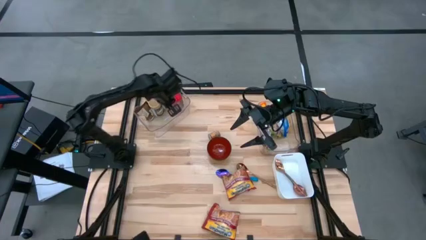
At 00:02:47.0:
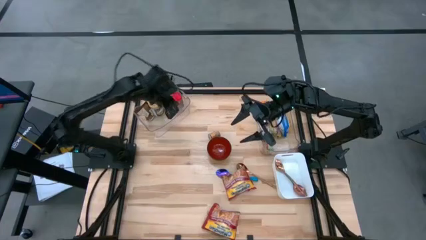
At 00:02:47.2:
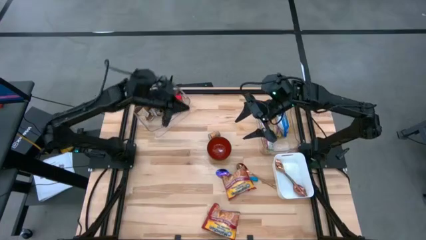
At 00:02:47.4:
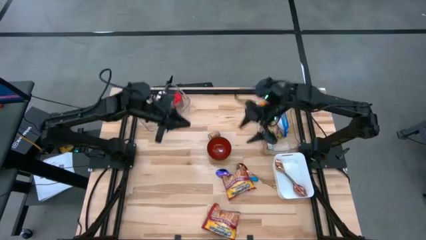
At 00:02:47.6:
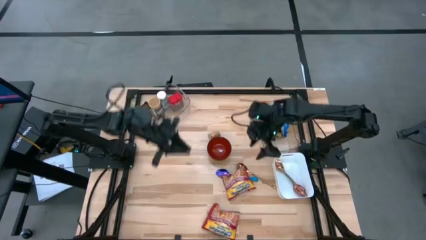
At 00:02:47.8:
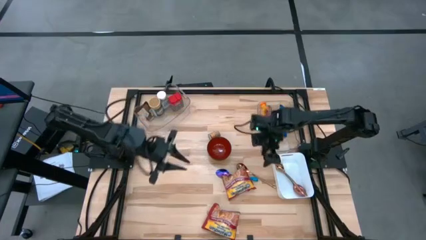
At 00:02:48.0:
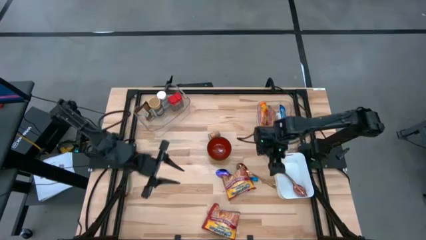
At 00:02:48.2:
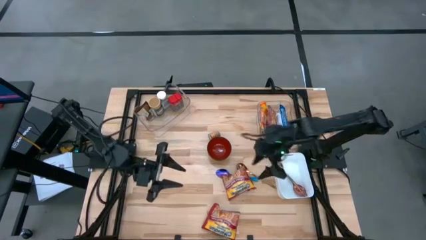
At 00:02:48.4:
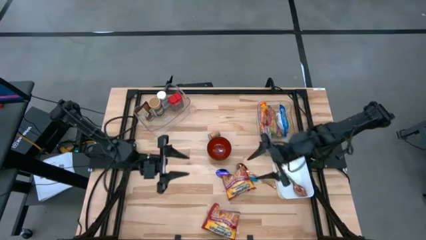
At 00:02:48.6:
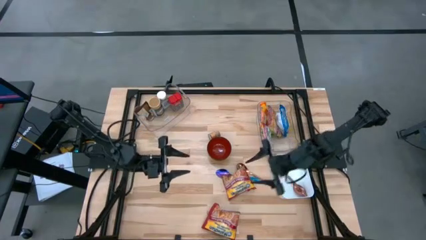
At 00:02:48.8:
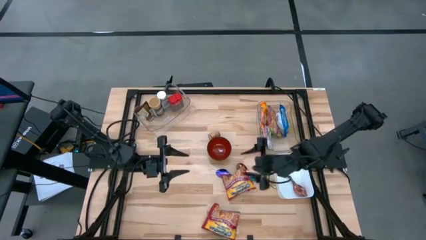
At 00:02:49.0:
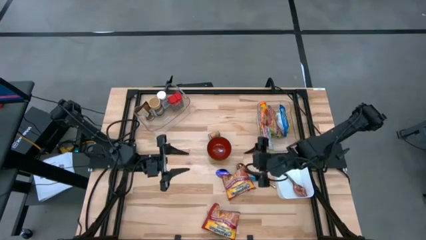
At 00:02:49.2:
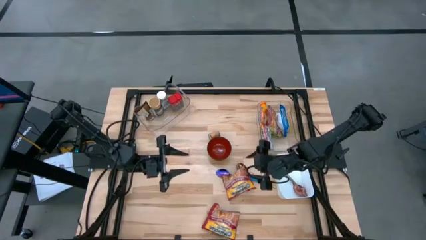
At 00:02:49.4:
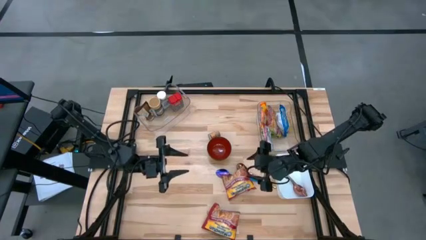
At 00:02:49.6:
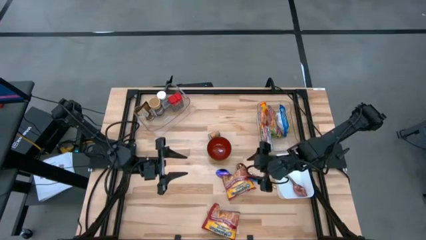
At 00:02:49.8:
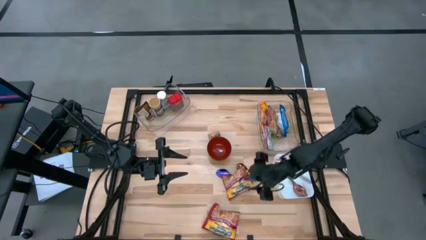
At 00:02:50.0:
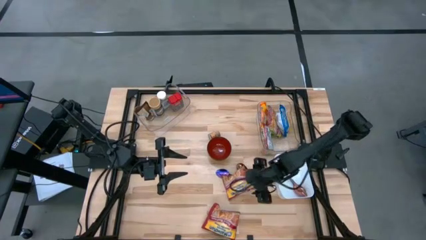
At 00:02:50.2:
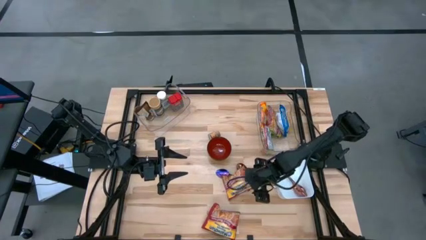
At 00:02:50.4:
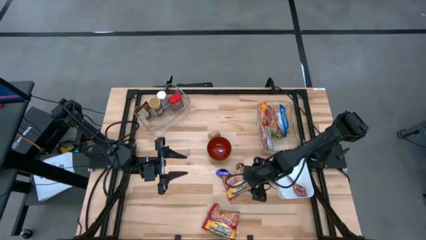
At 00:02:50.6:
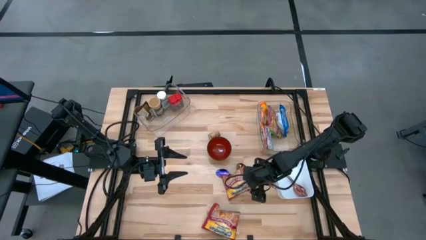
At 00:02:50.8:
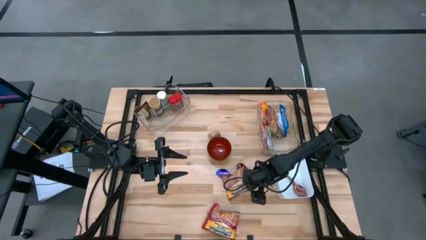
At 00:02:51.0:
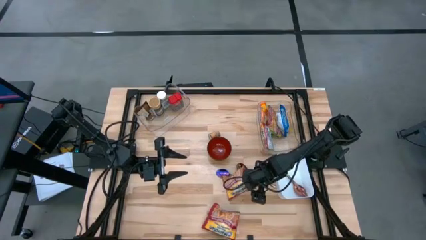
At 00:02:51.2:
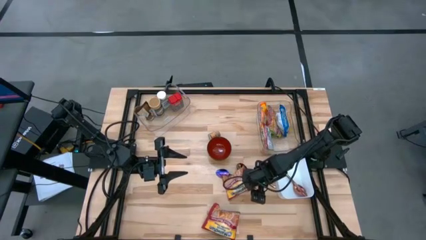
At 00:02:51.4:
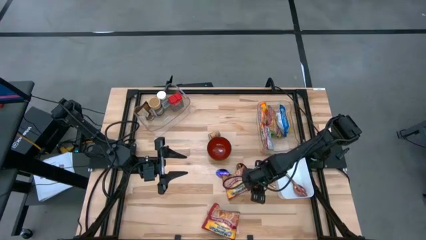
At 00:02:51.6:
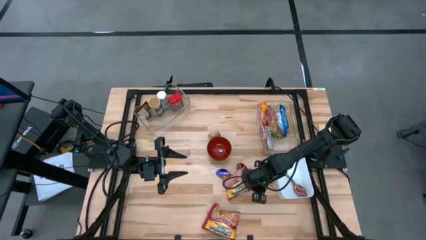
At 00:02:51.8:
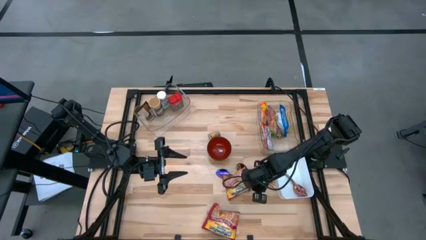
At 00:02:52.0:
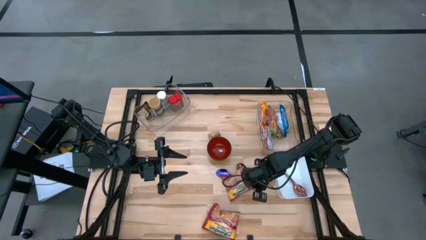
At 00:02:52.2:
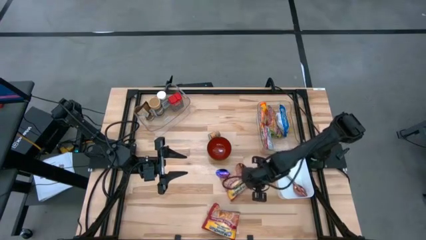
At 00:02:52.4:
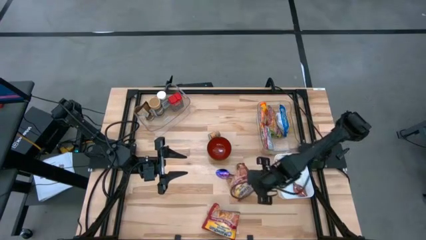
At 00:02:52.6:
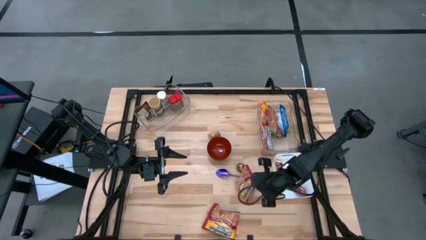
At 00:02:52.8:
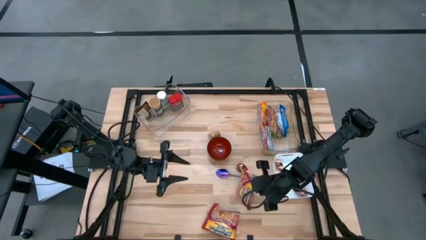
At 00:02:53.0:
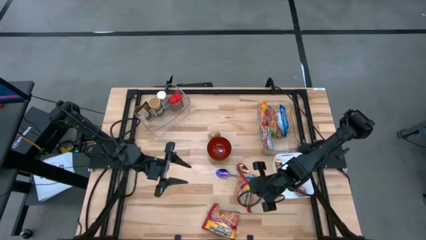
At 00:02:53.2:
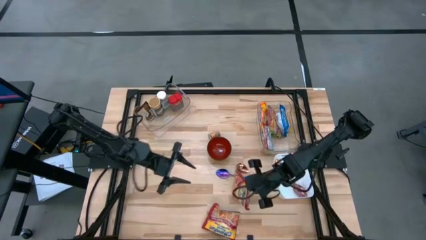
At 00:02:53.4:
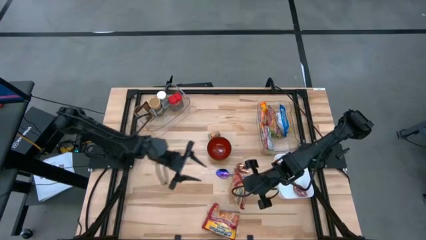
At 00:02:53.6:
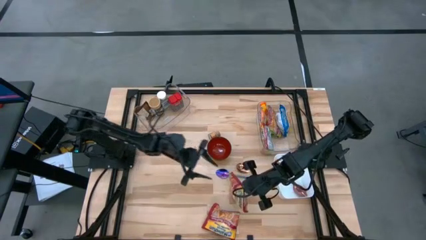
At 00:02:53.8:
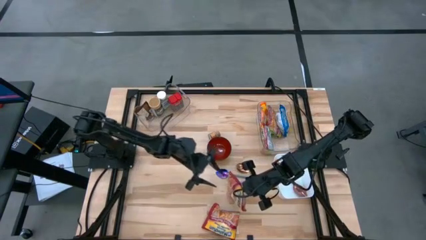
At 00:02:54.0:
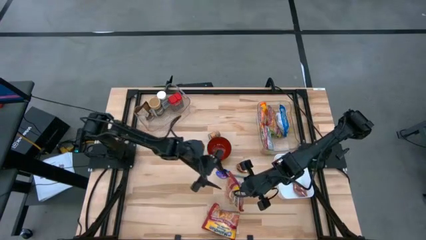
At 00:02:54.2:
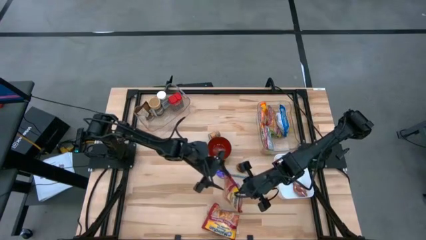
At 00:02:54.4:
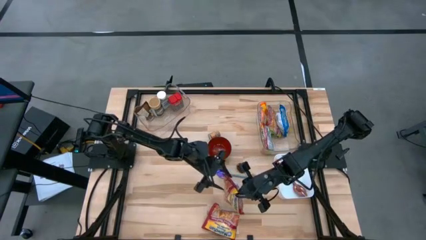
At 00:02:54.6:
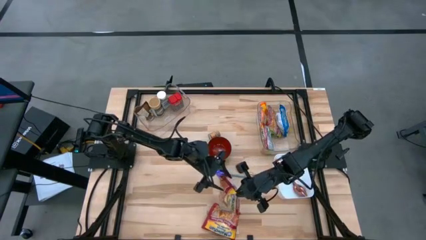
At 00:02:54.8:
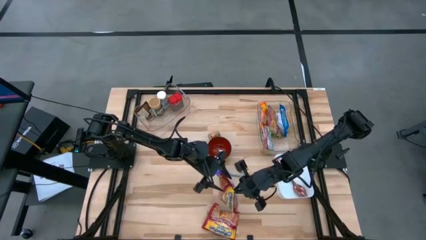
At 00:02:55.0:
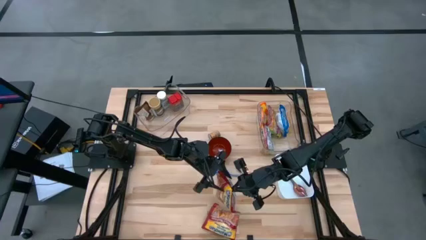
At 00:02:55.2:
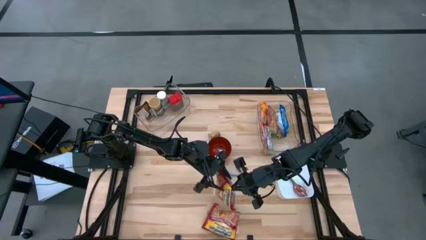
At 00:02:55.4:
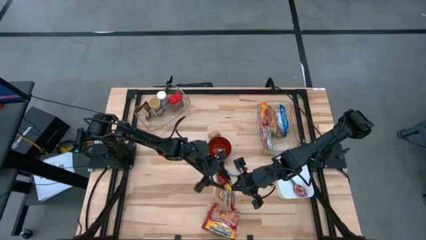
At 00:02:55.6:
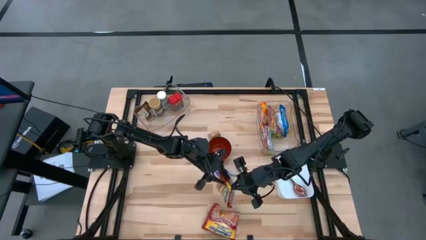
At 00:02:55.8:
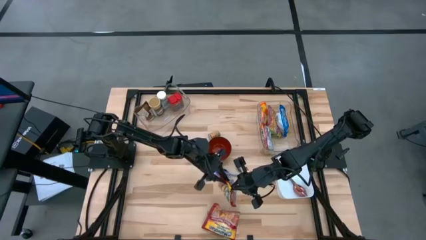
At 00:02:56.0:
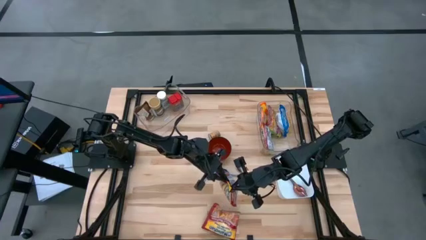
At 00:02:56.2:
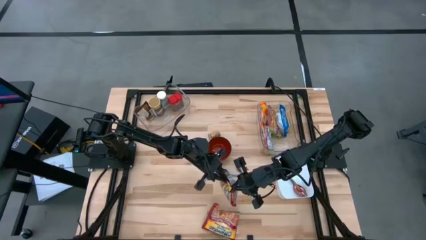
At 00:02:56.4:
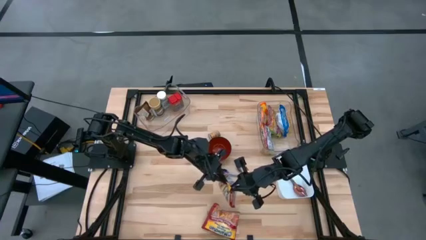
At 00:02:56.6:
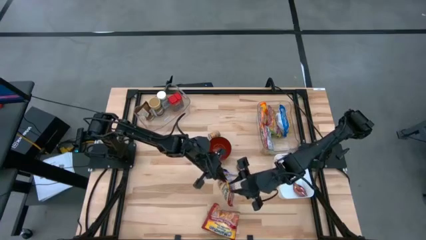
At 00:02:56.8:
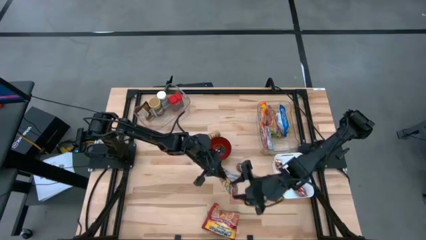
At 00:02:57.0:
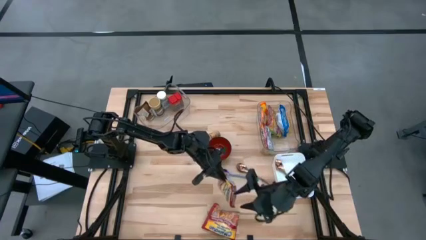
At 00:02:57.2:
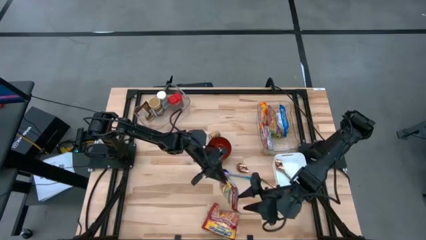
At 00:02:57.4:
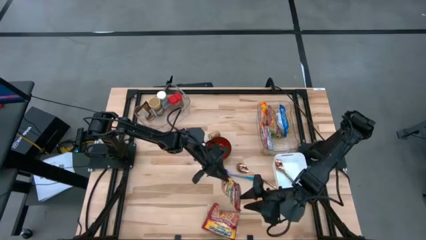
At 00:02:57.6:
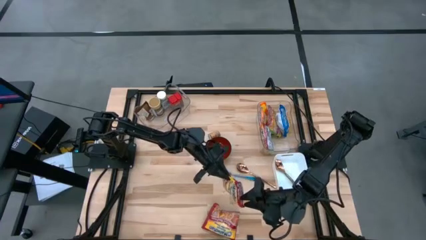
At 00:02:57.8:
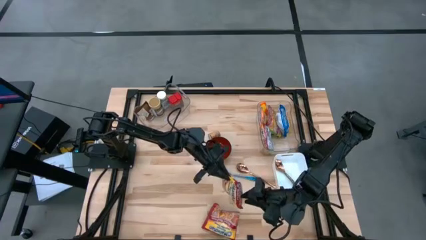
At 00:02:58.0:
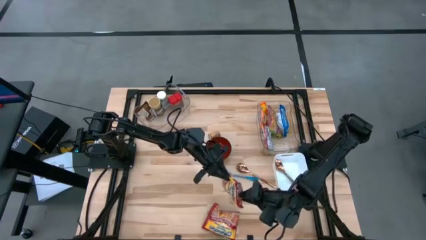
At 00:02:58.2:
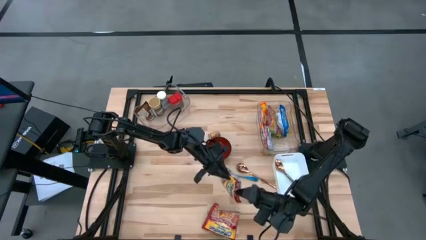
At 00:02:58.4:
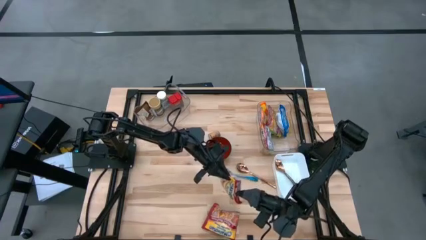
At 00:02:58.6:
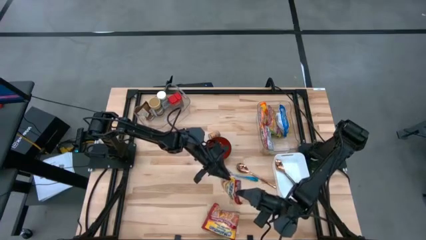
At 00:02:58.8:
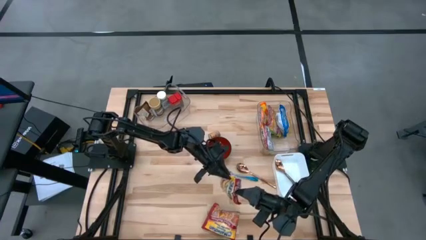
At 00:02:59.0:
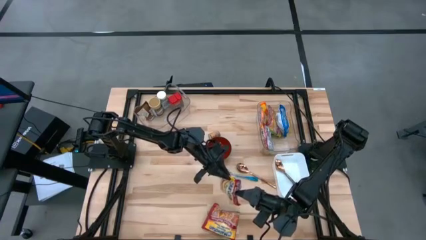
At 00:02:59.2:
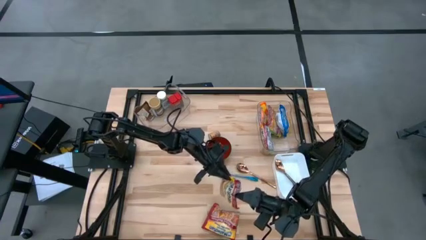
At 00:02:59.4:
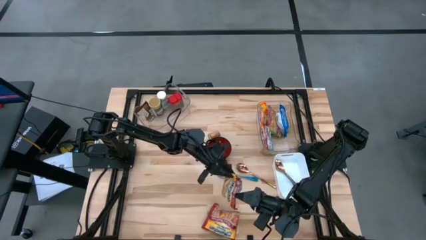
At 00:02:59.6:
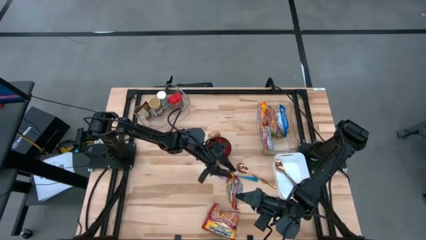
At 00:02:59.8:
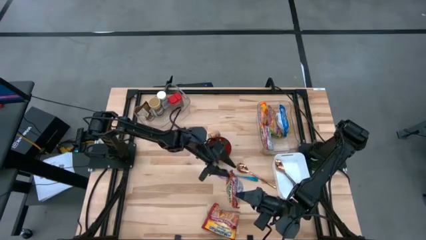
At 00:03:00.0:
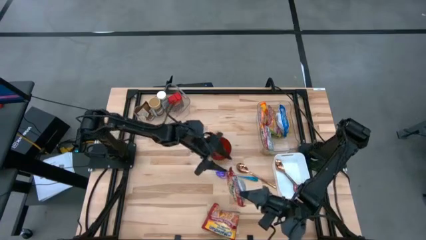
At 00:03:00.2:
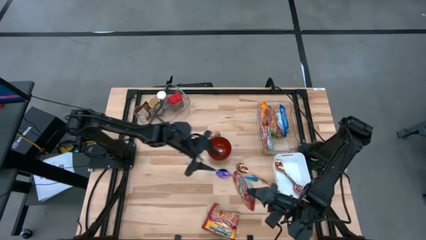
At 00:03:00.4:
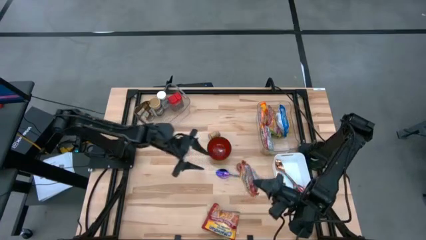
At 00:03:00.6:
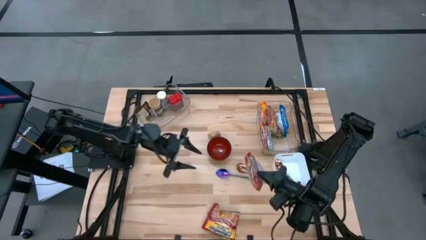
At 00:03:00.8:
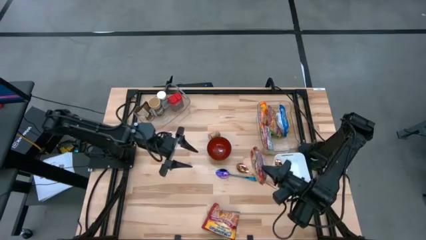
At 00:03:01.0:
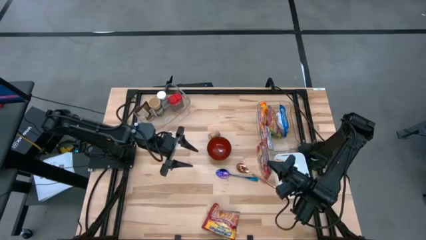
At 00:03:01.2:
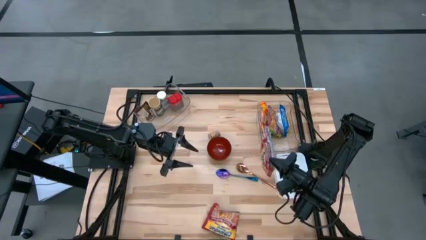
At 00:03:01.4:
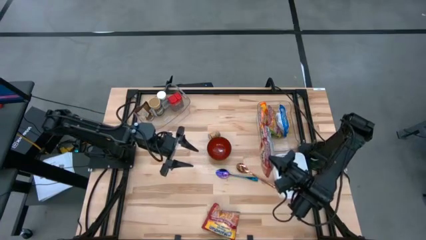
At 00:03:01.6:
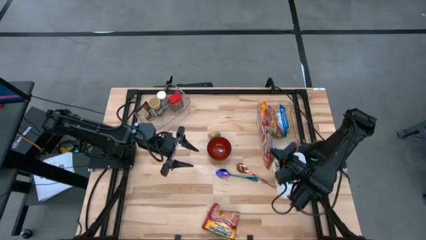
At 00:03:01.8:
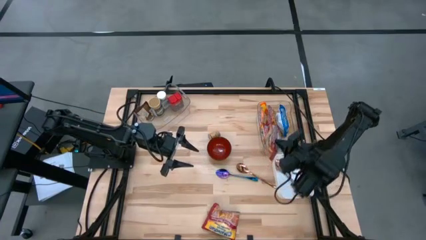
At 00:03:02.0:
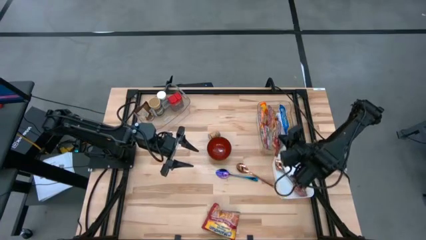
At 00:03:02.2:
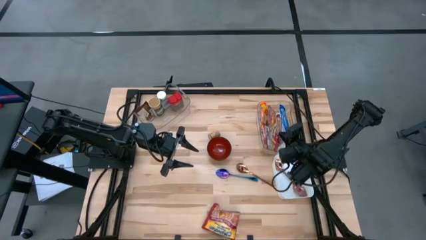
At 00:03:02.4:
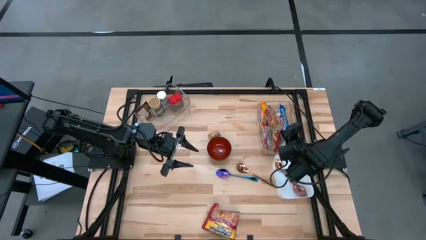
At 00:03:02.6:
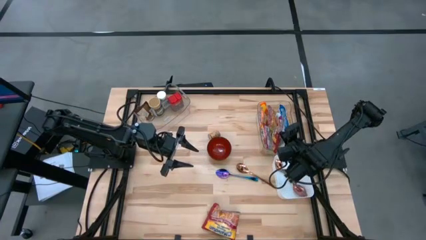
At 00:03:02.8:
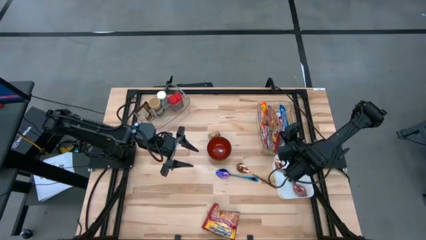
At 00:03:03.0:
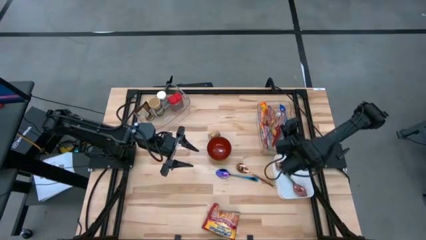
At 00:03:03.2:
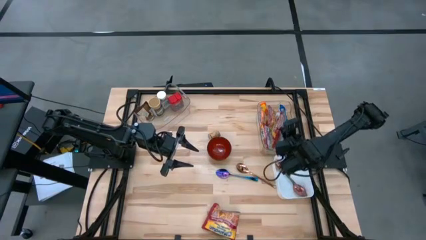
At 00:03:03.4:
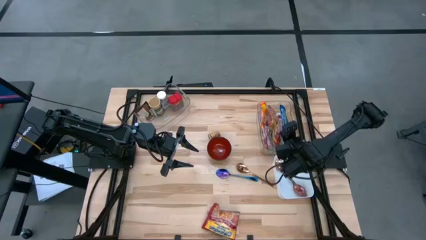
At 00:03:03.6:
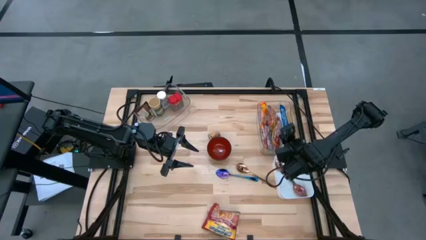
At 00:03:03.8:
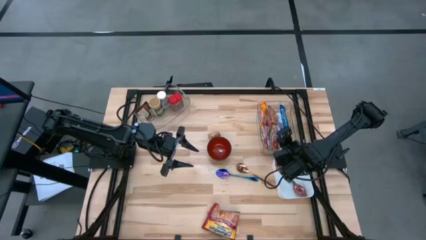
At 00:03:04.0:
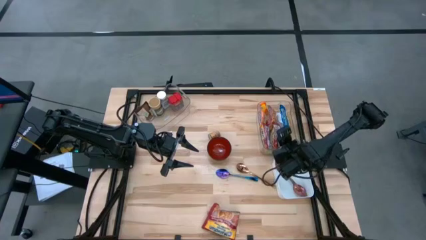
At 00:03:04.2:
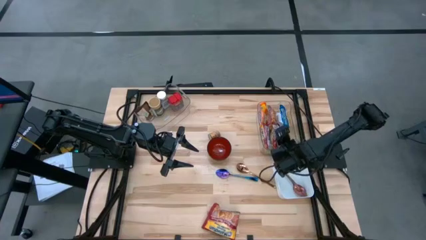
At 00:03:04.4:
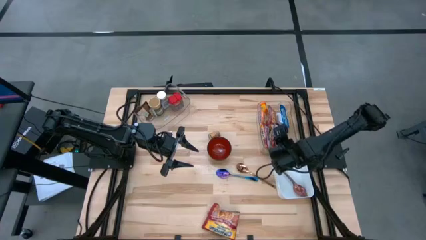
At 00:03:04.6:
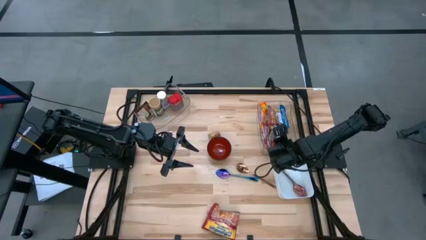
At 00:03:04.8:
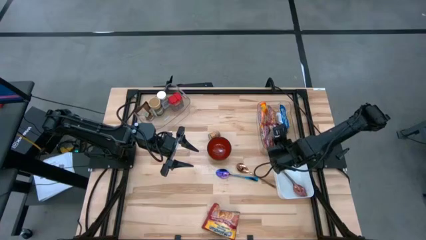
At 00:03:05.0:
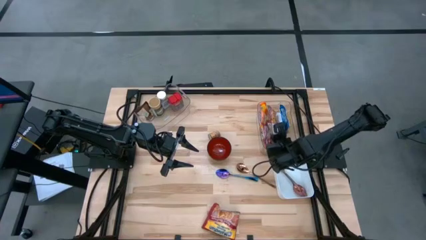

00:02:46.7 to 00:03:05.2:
Task: Pick & Place Food Item
Put the top red noodle pack into the right transparent bin
